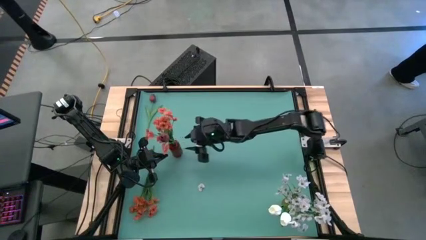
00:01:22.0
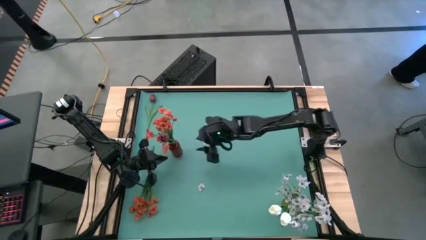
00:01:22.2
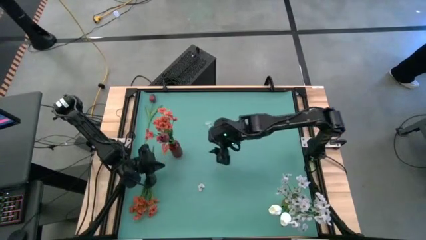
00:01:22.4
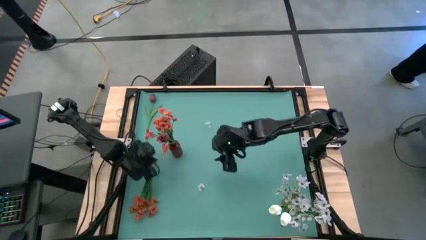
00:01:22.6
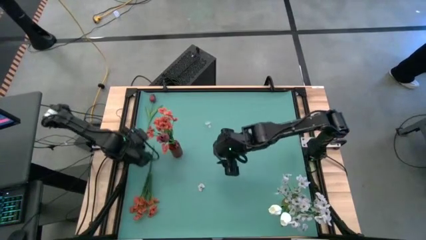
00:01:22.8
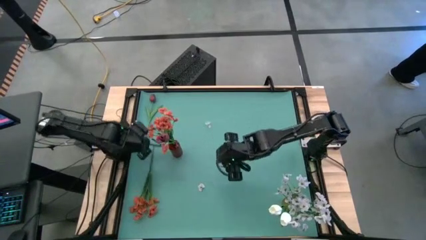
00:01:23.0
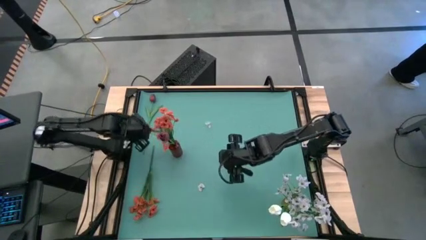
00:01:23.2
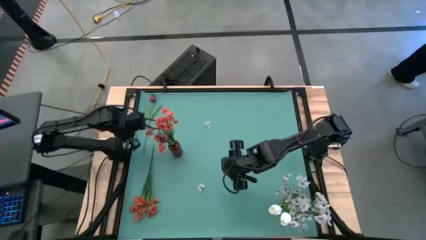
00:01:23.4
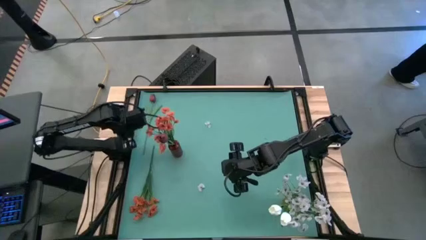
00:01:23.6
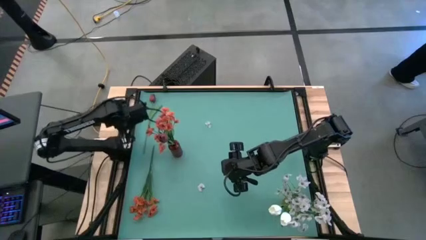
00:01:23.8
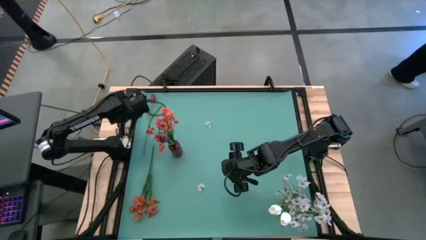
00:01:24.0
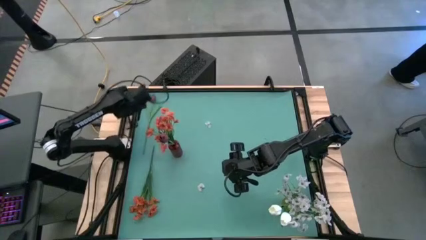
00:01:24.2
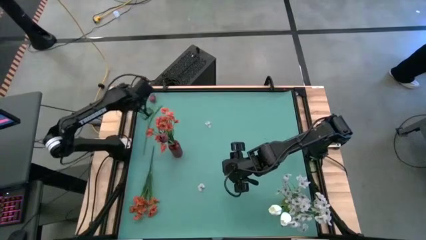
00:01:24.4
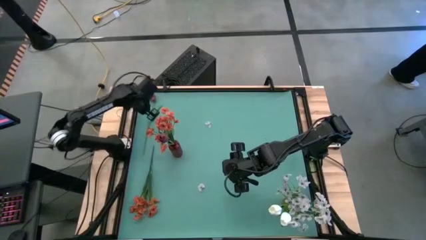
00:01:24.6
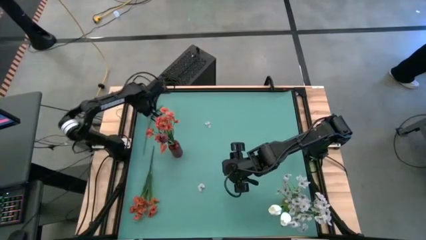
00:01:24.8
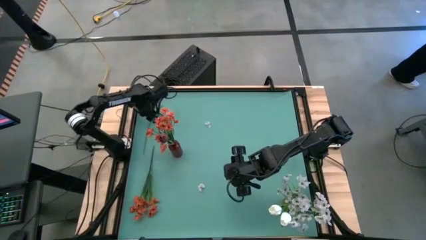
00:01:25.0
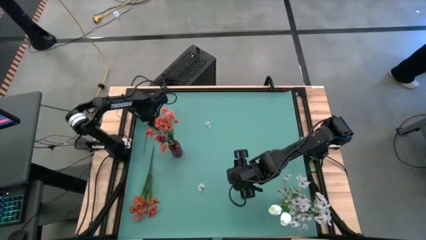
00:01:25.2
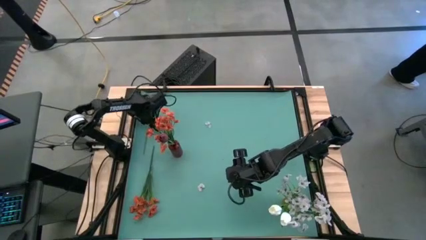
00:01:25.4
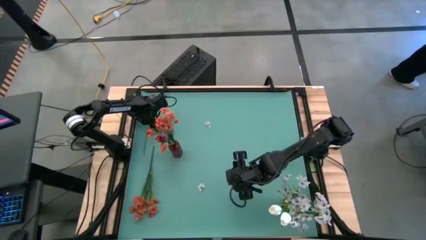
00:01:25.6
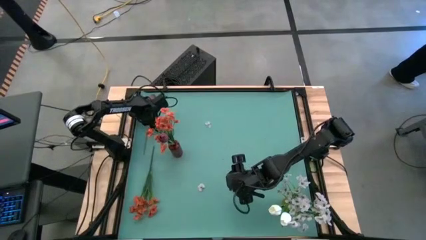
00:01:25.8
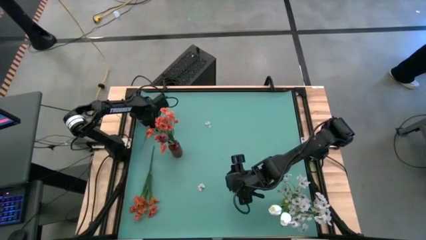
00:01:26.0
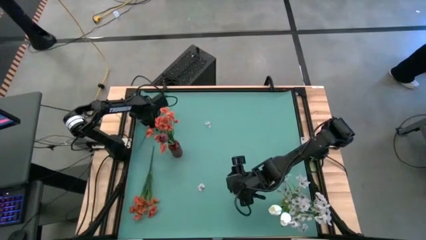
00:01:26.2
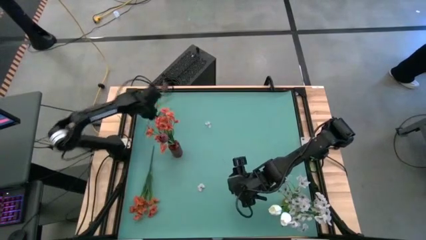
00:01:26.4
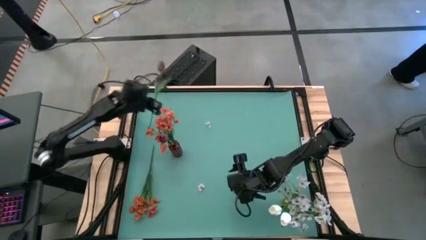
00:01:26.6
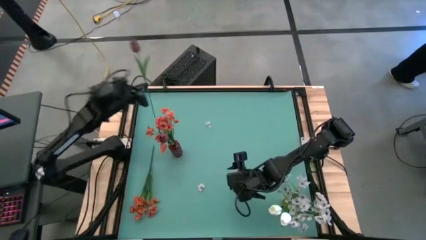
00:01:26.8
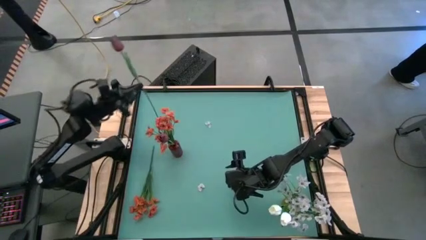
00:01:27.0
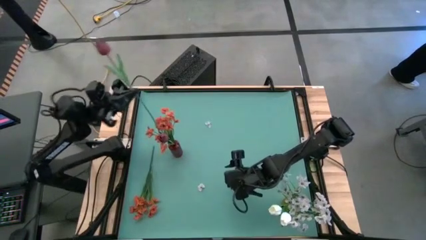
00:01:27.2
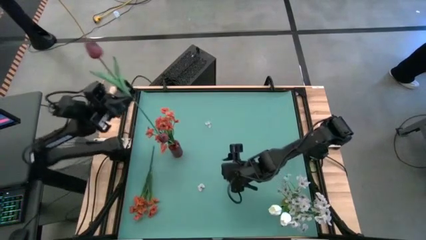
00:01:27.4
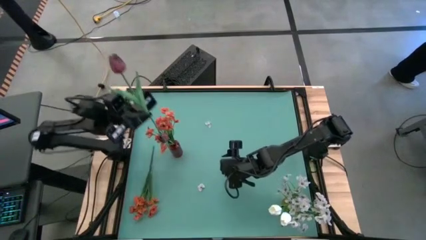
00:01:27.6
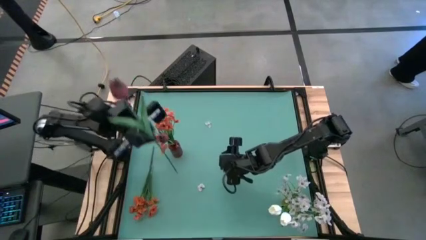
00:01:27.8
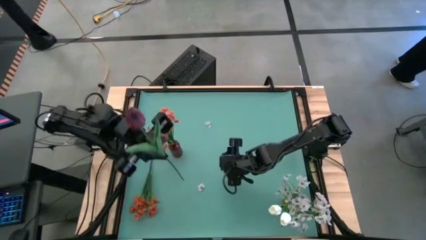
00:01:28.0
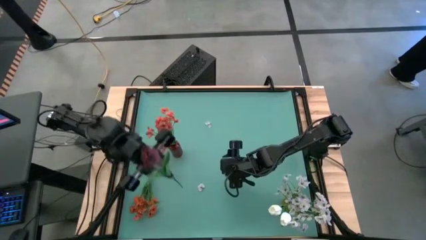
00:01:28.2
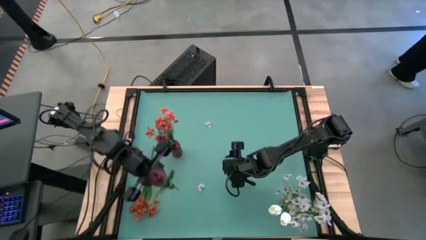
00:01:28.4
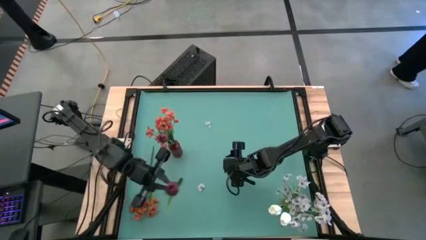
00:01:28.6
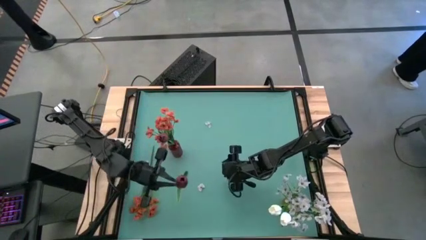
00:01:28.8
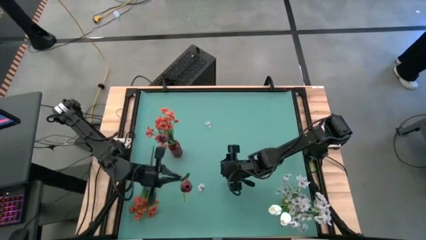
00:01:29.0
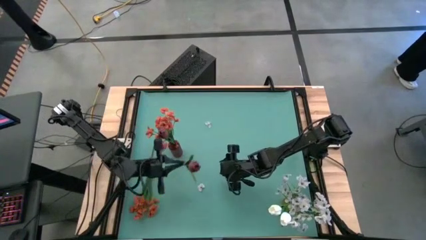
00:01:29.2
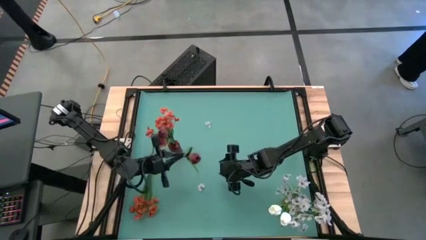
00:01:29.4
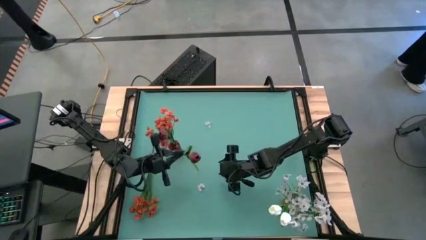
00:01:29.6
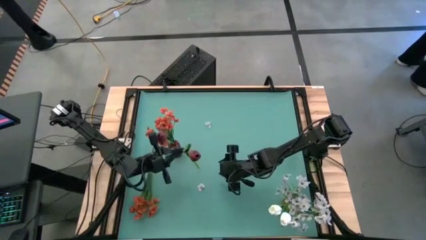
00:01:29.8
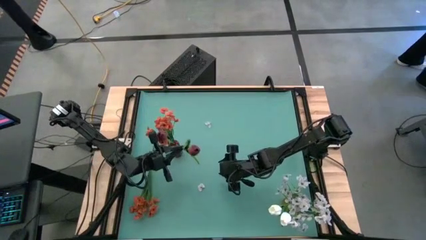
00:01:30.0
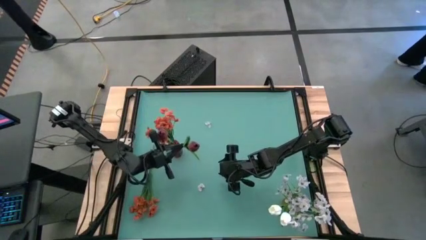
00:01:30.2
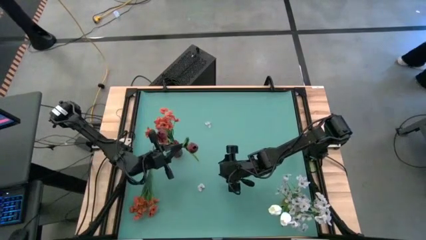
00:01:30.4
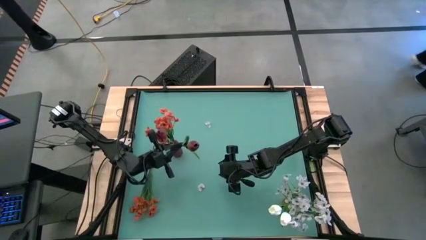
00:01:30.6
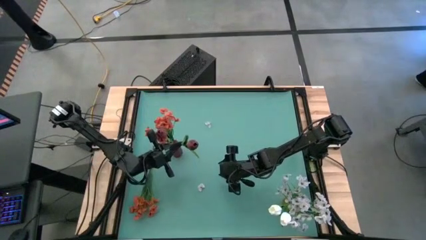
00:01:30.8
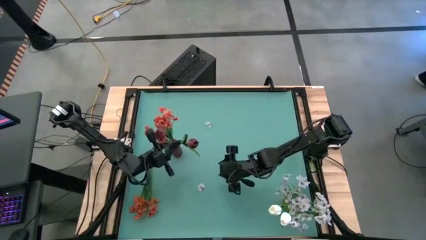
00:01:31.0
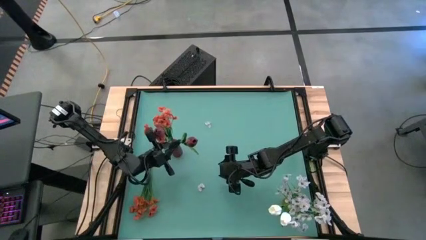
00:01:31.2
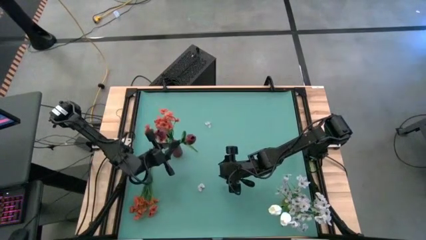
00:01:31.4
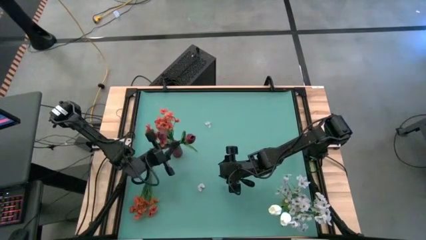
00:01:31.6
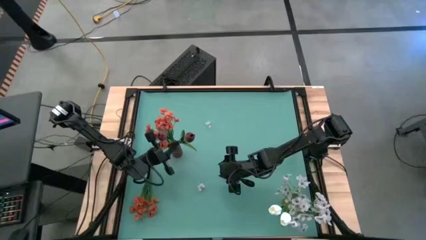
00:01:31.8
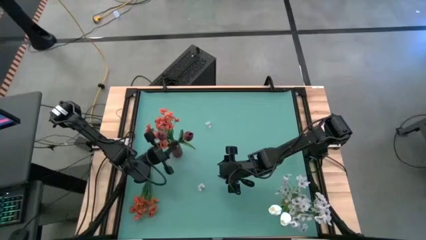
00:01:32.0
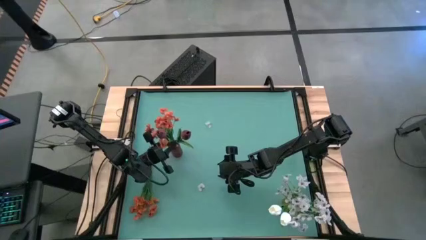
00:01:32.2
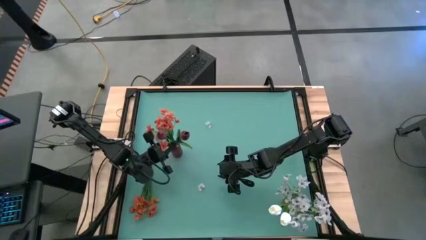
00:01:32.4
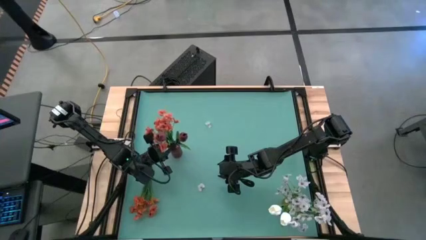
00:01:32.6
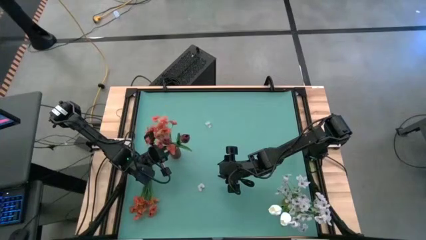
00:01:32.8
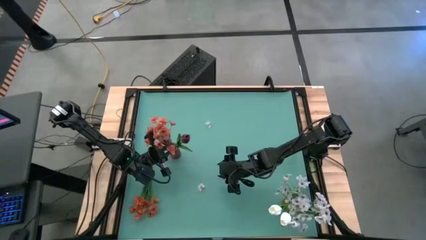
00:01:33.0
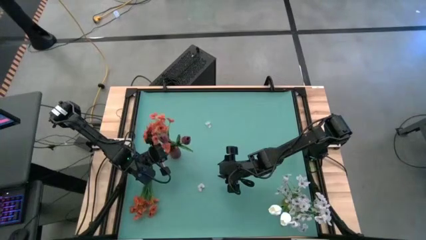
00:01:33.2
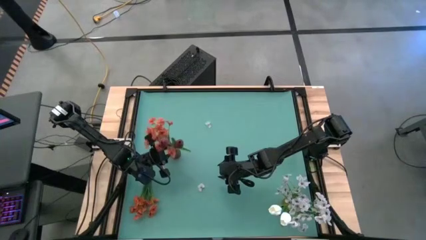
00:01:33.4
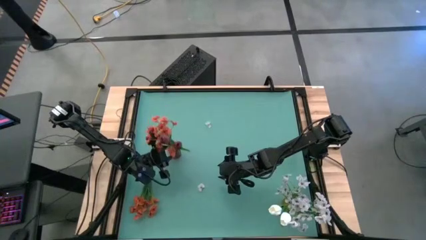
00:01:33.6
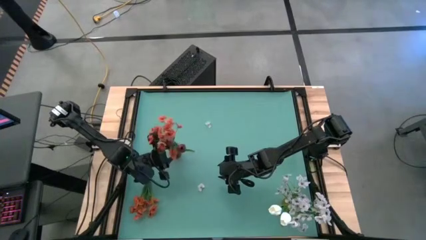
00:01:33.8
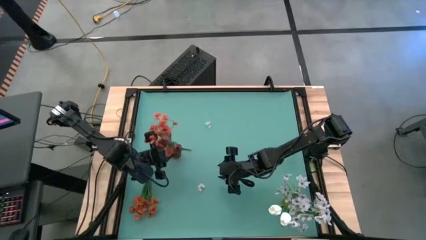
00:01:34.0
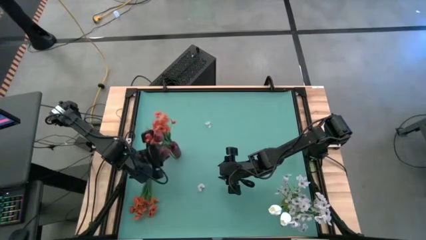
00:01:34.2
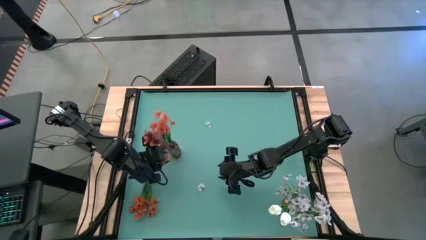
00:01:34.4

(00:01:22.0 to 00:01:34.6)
Task: Sort flowers into vase by color
Put the dark red flower into the red vase
